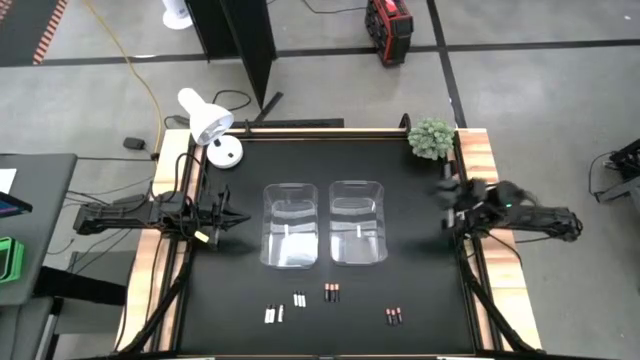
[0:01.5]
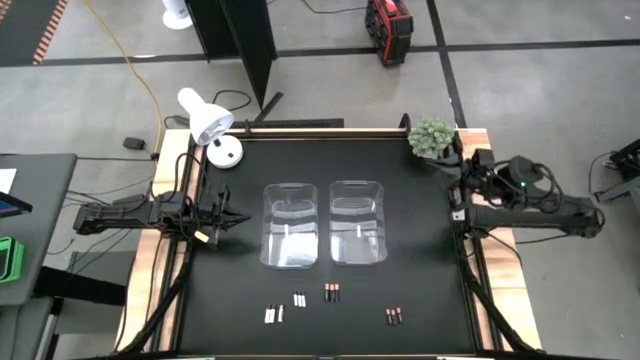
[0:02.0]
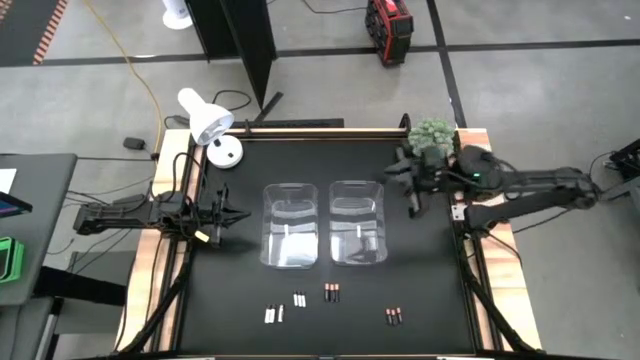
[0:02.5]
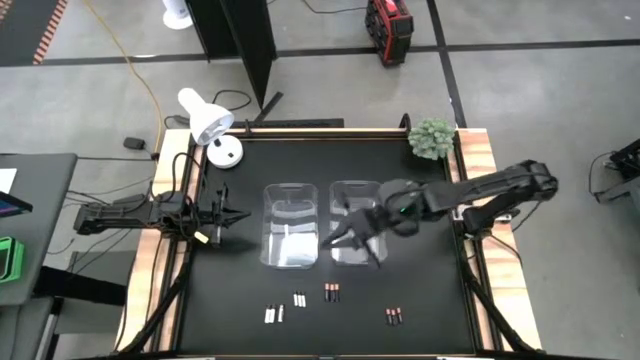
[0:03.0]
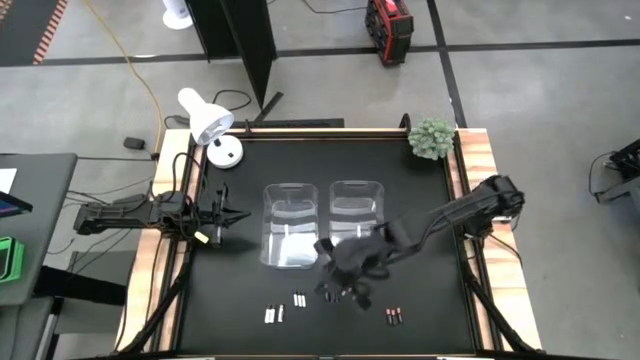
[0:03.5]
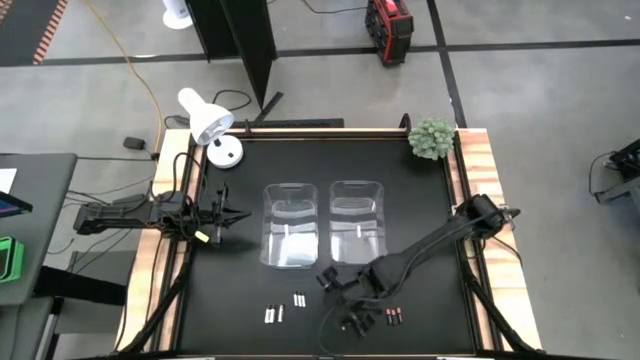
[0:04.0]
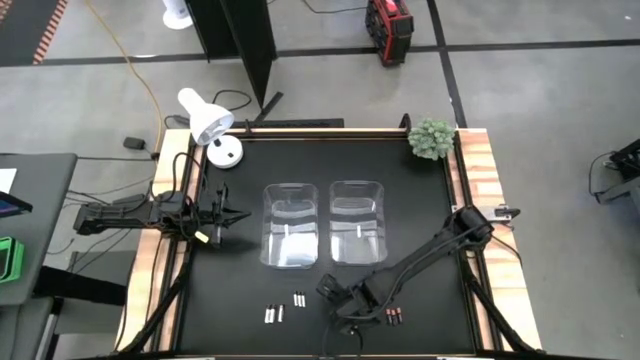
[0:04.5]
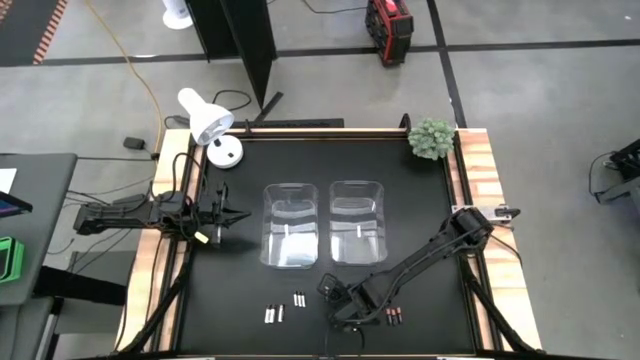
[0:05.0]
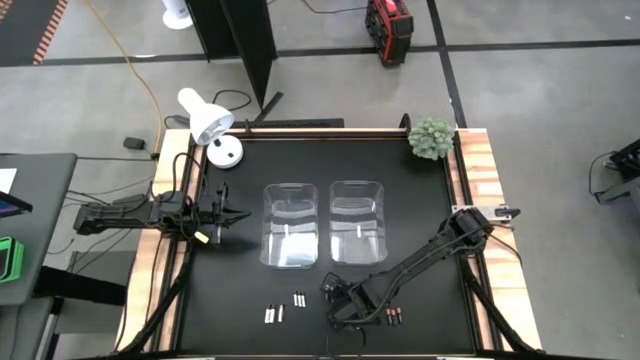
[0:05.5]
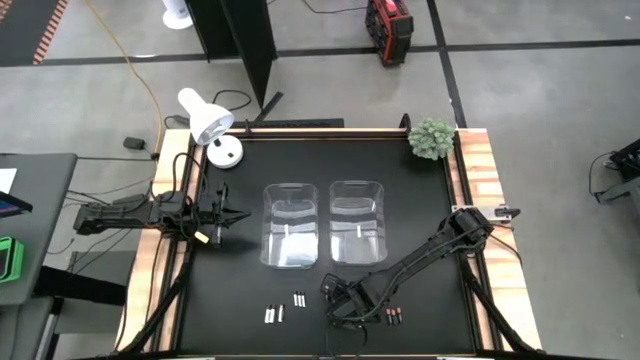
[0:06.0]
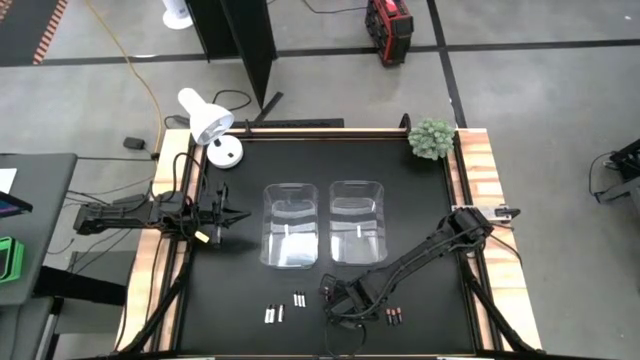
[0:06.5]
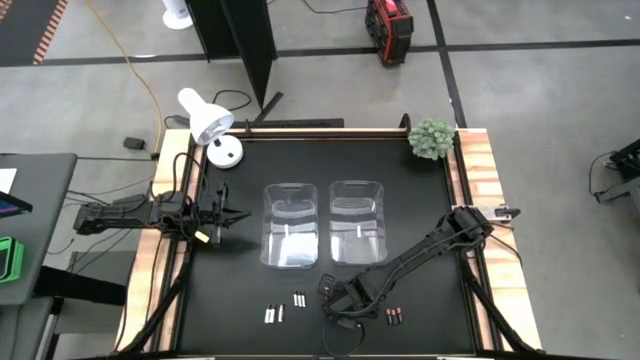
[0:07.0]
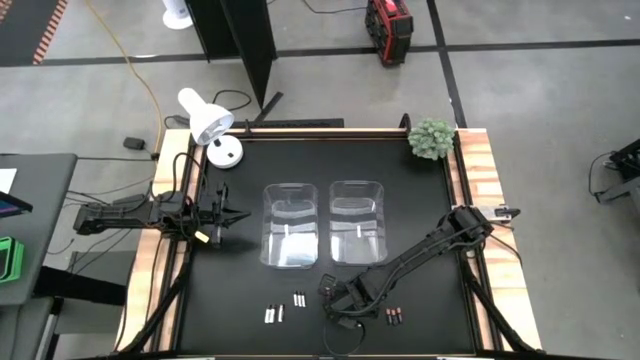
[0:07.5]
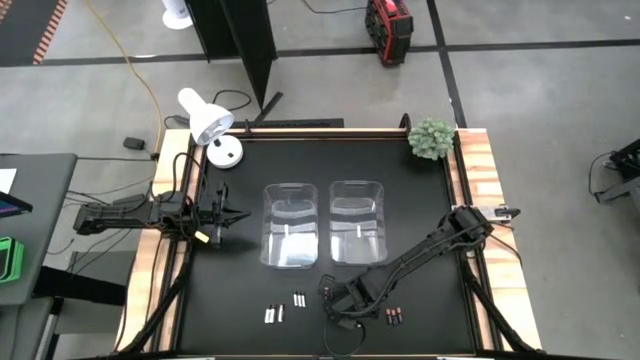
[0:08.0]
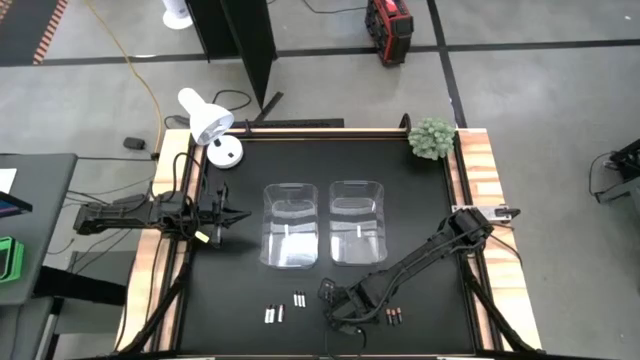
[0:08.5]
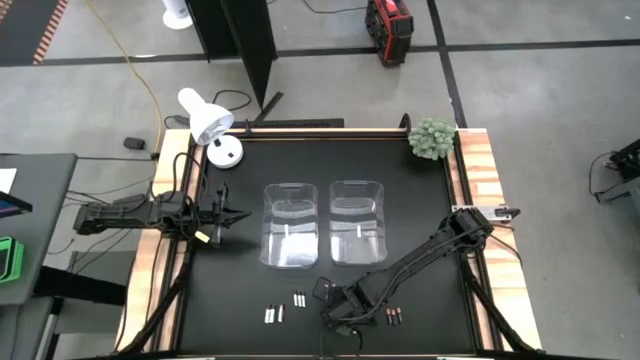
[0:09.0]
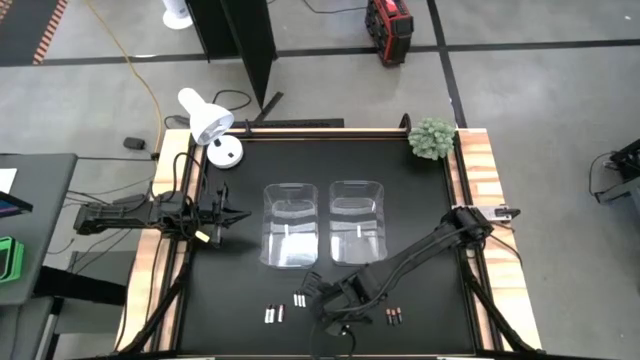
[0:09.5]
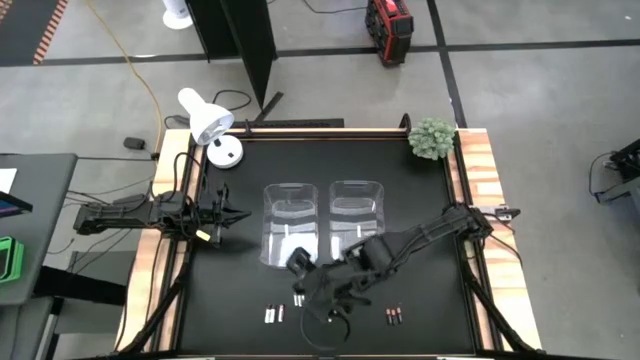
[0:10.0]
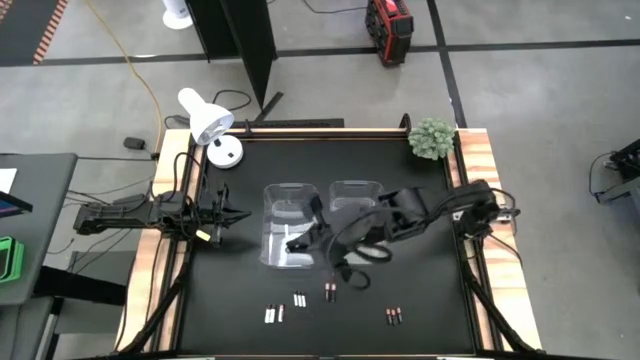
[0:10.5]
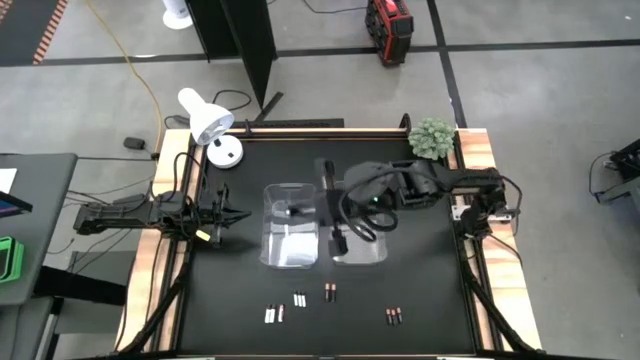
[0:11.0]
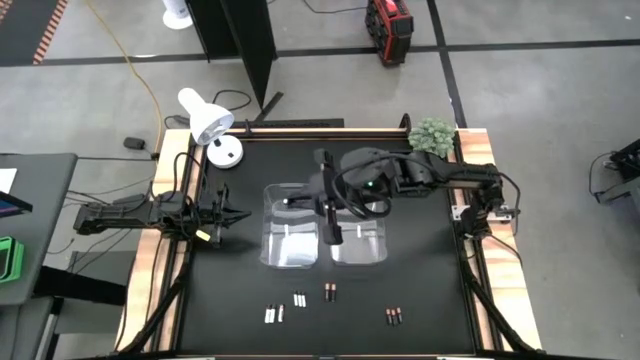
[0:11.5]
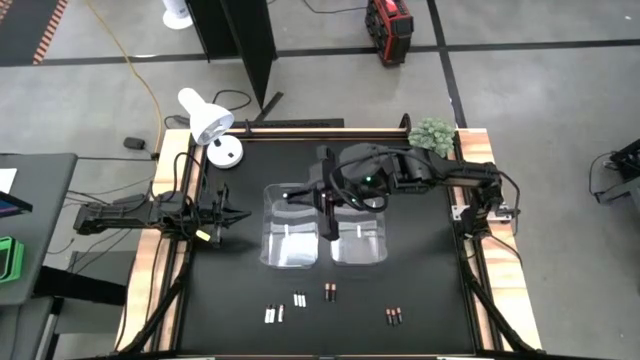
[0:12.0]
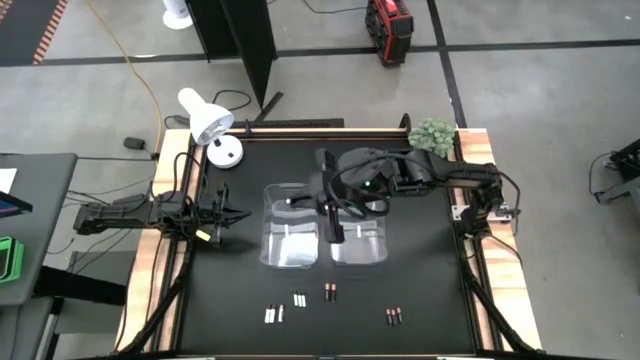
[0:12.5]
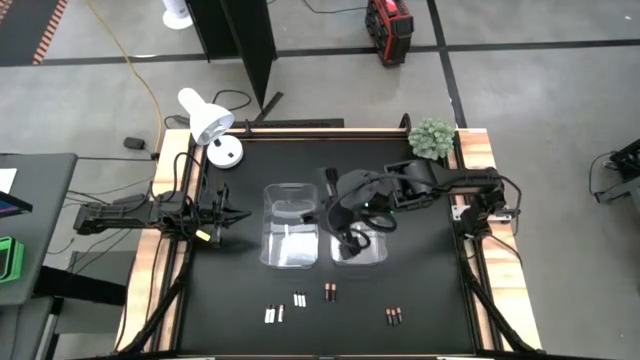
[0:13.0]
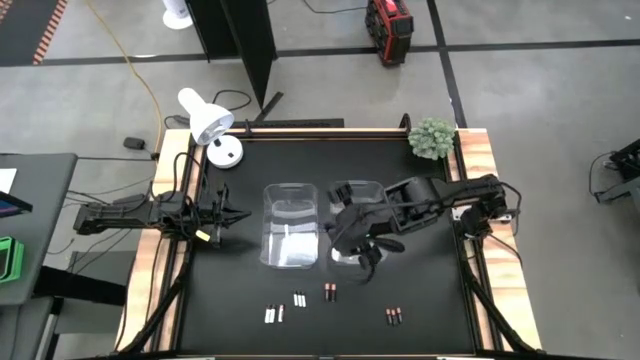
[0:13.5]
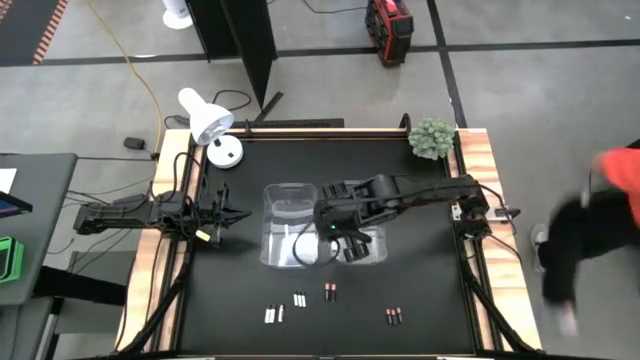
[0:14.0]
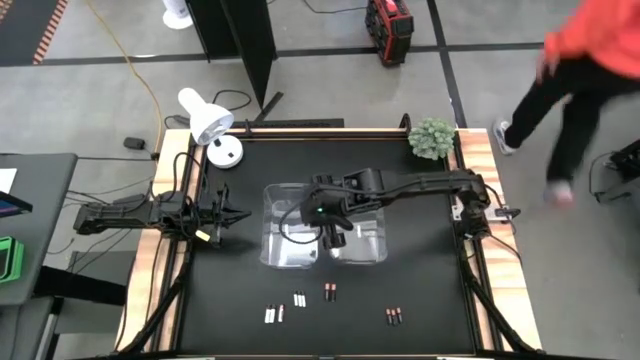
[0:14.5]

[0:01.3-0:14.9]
Task: Sort batteries
Put the black battery into the right transparent bin

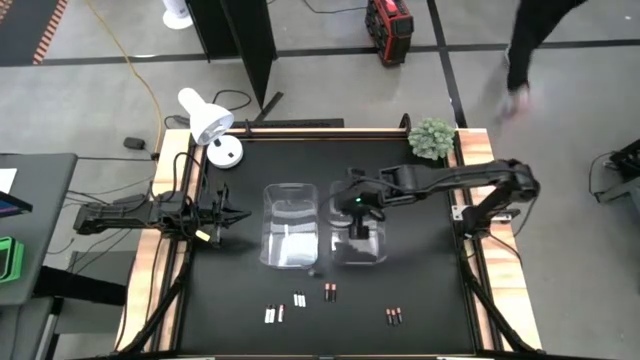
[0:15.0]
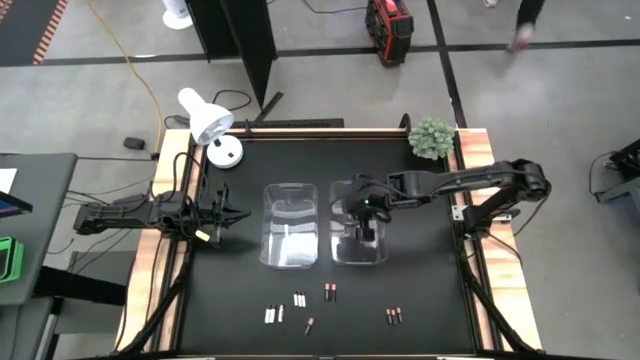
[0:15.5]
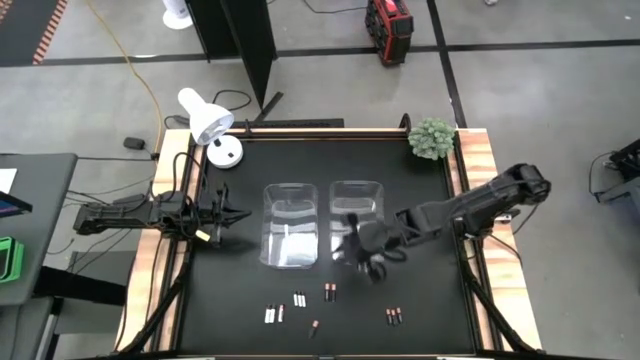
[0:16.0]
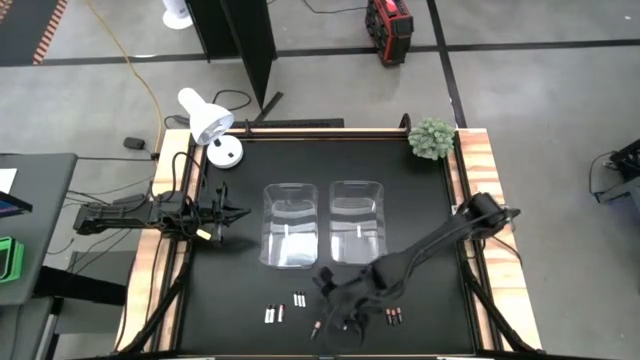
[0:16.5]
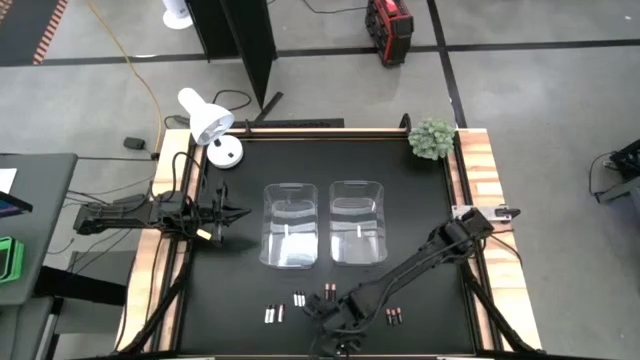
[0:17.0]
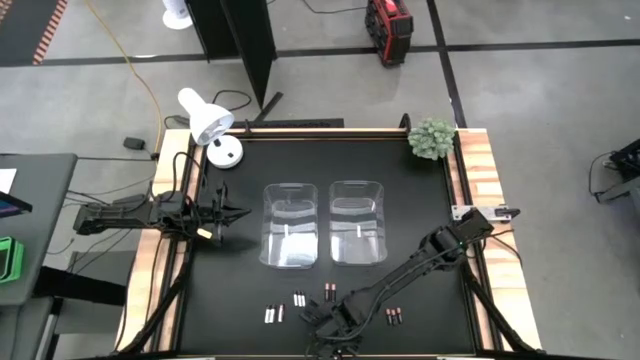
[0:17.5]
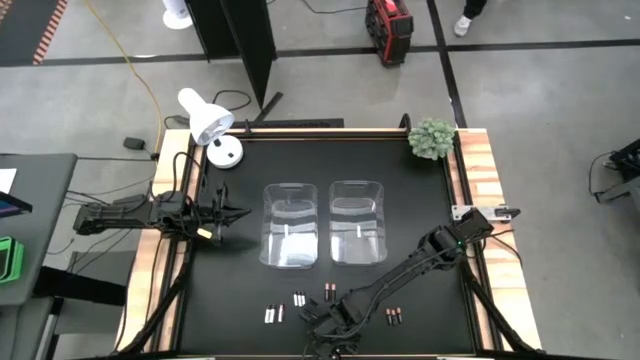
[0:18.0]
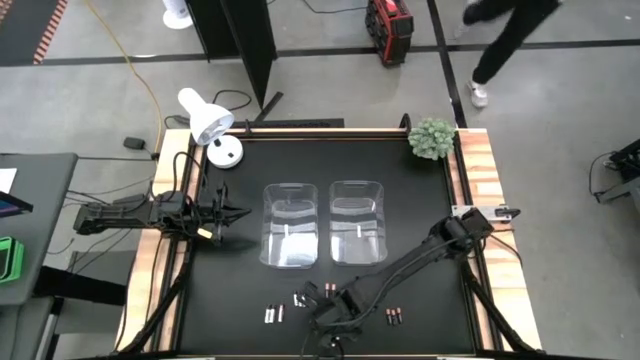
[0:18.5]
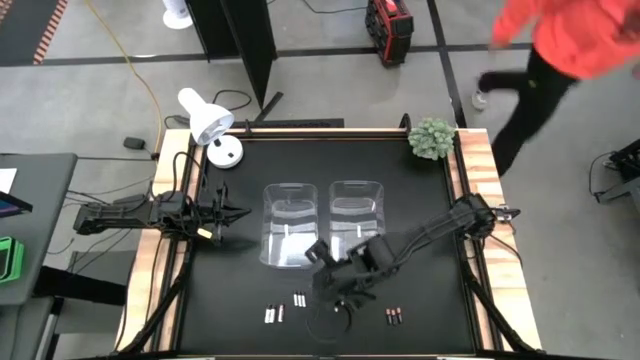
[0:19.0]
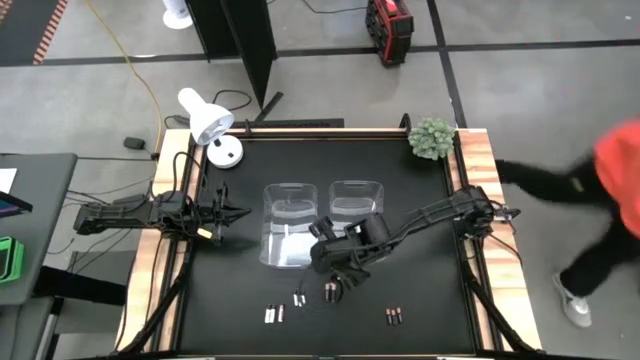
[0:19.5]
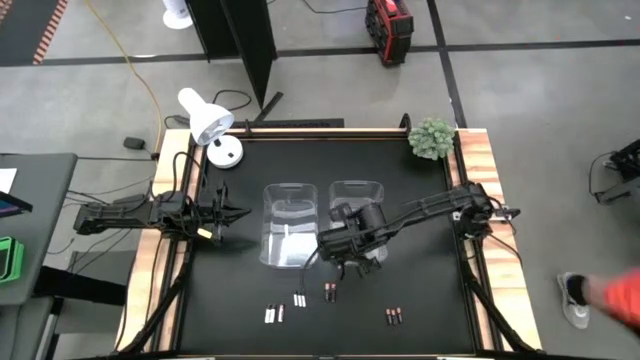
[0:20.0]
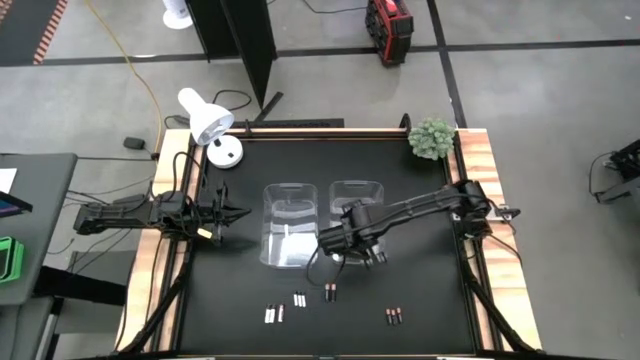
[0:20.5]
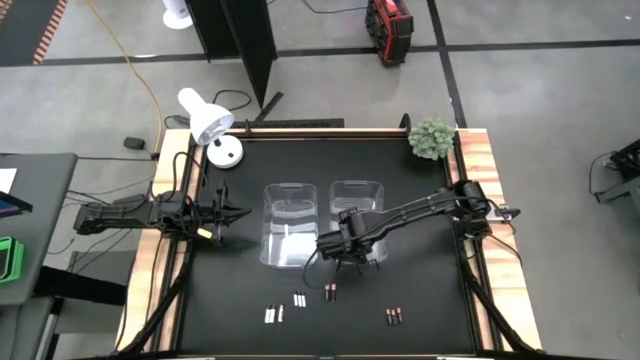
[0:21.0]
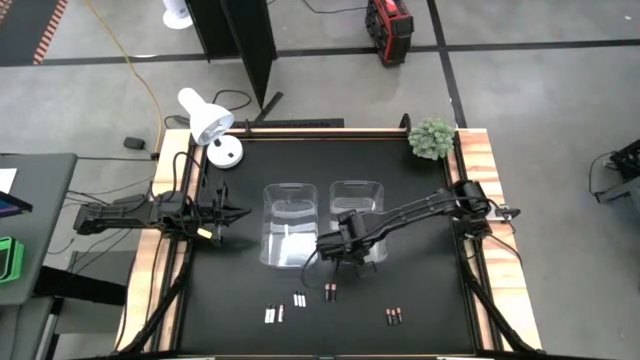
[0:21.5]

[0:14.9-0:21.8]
Put the black battery into the right transparent bin
